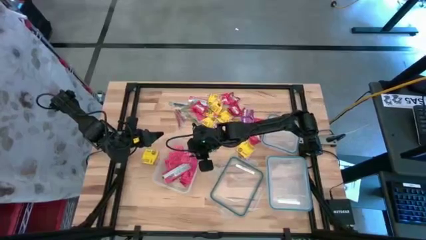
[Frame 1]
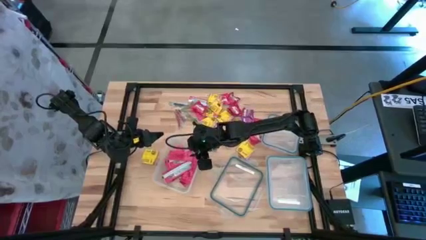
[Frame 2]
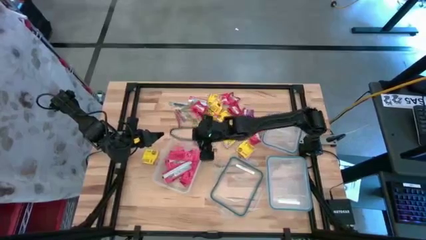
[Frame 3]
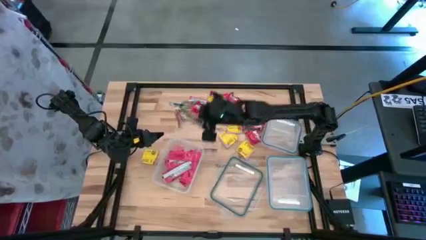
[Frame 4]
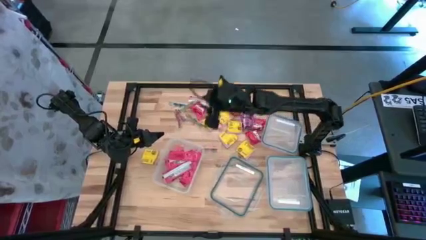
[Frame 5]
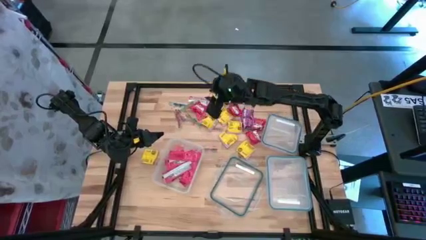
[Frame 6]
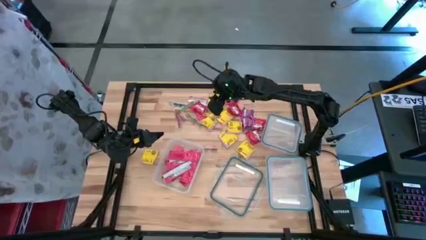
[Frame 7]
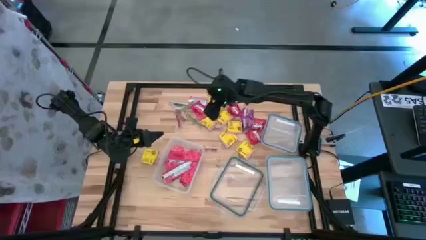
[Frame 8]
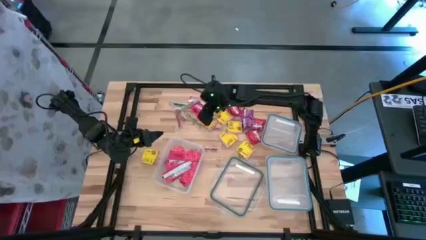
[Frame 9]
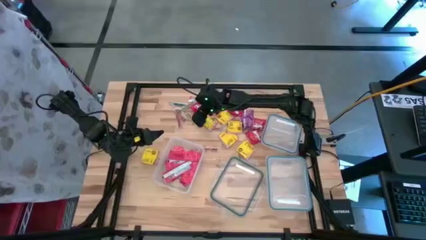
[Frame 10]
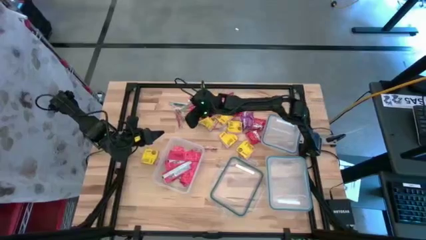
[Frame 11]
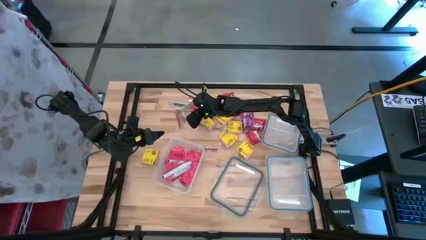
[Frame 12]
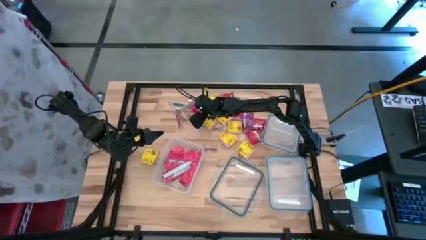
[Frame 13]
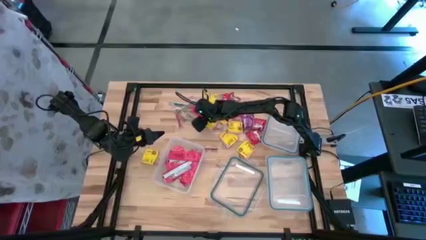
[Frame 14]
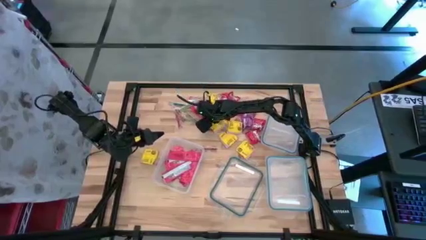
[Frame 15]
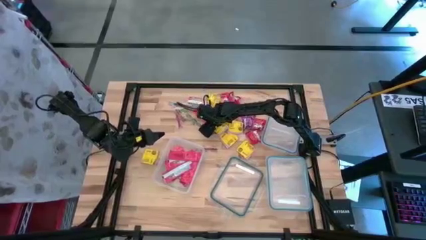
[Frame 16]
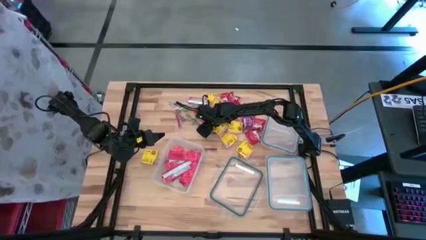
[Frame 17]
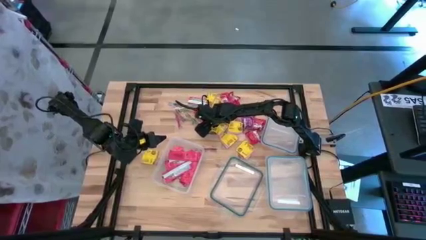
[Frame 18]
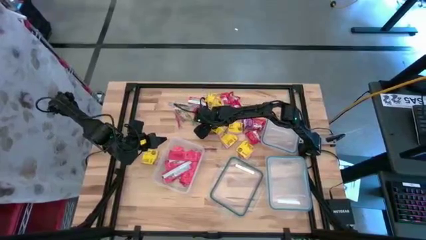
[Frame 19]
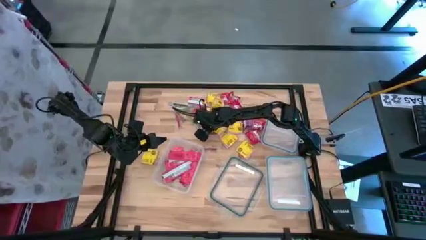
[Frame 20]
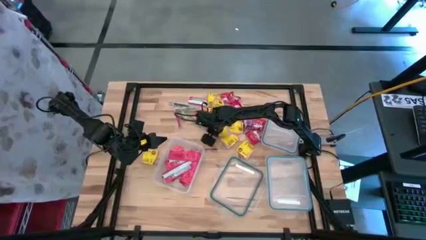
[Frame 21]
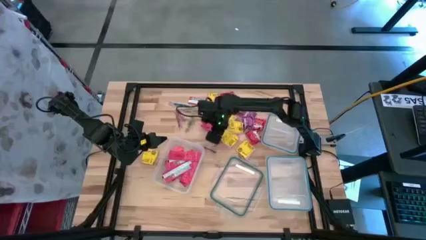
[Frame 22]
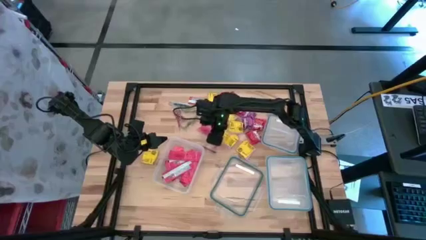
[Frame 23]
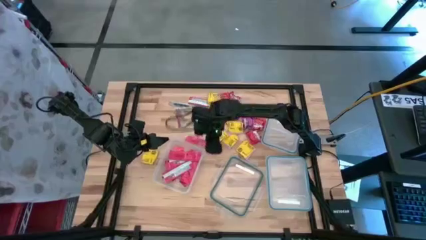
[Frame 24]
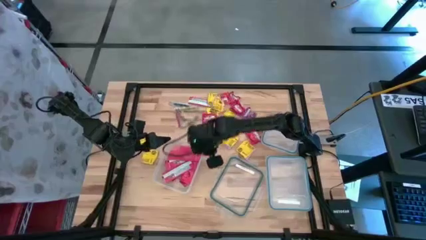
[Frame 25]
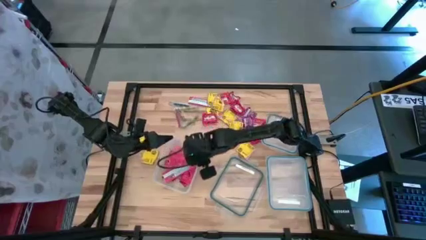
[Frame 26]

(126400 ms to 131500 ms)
Task: Sort candy
Put the red candy strip into the rectangular transparent bin

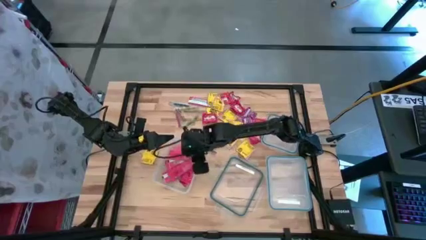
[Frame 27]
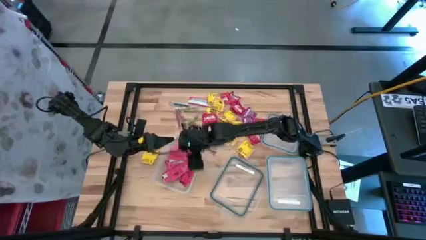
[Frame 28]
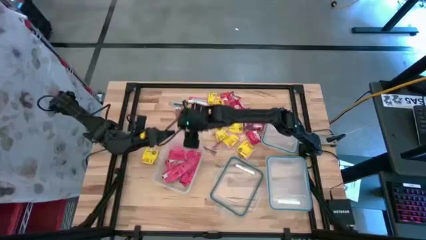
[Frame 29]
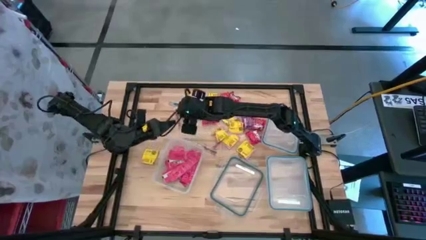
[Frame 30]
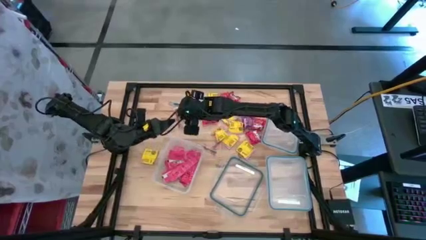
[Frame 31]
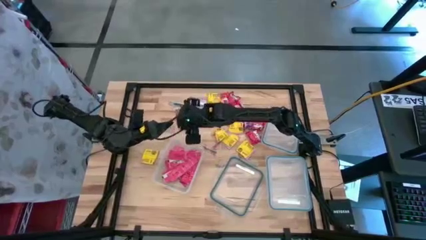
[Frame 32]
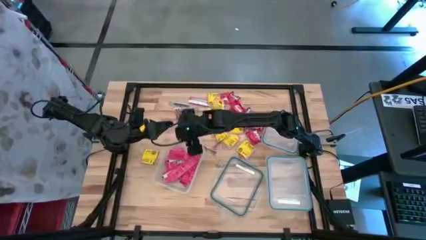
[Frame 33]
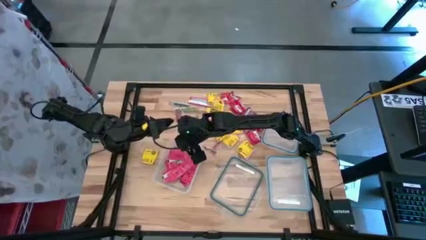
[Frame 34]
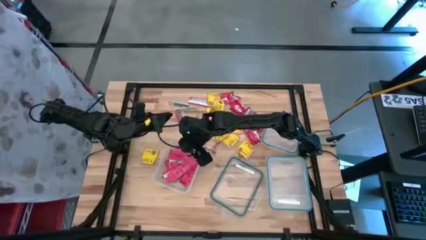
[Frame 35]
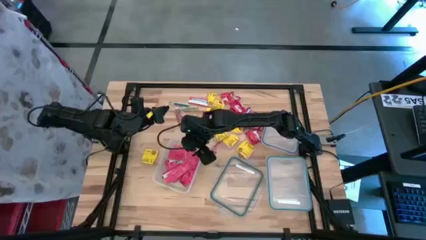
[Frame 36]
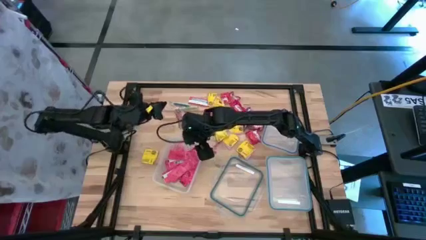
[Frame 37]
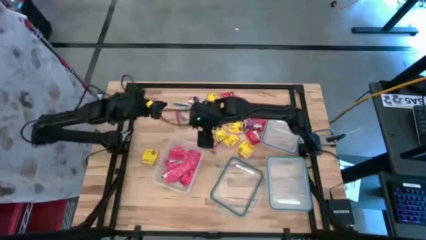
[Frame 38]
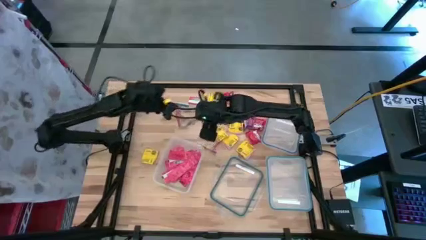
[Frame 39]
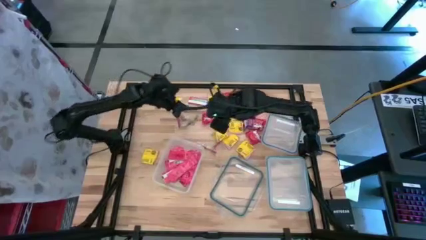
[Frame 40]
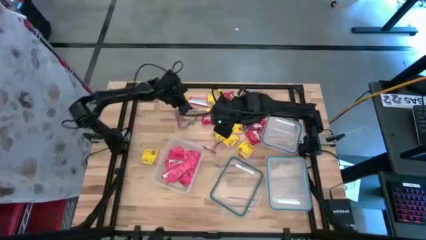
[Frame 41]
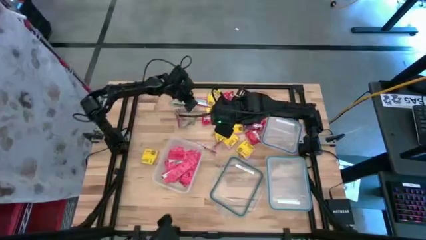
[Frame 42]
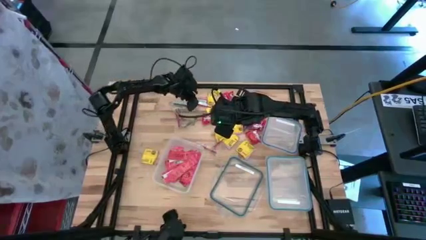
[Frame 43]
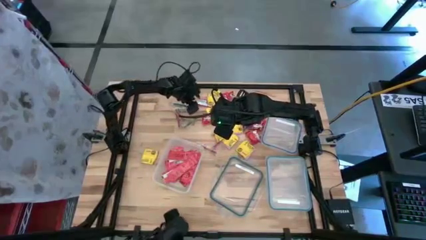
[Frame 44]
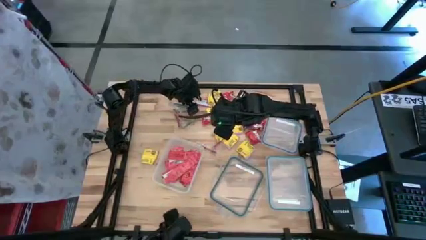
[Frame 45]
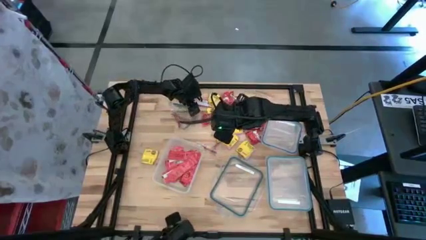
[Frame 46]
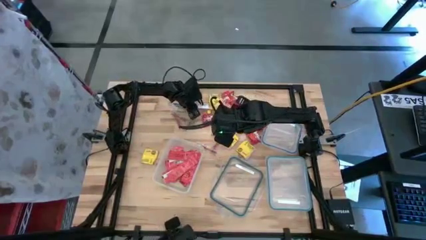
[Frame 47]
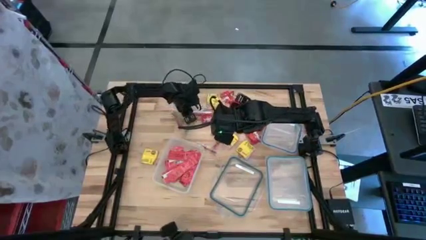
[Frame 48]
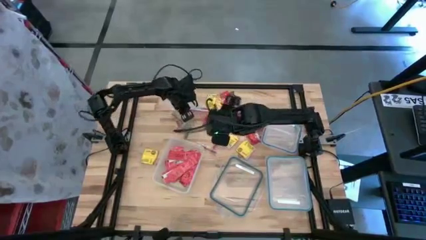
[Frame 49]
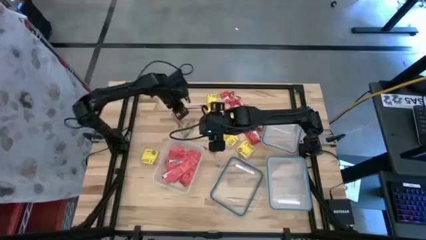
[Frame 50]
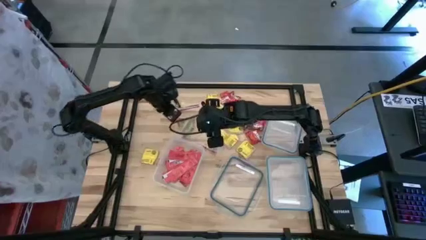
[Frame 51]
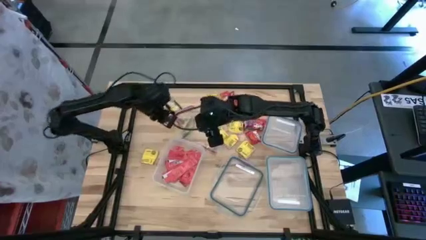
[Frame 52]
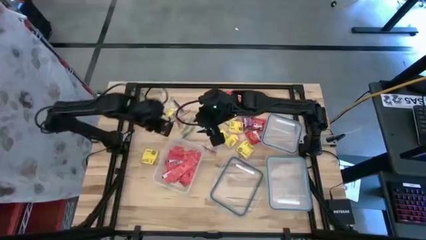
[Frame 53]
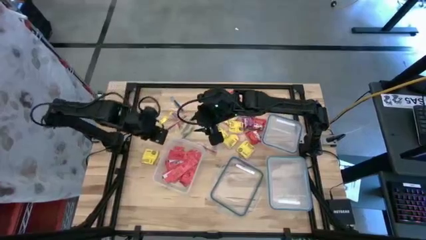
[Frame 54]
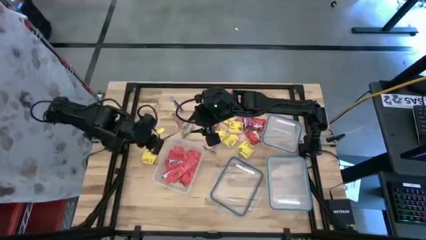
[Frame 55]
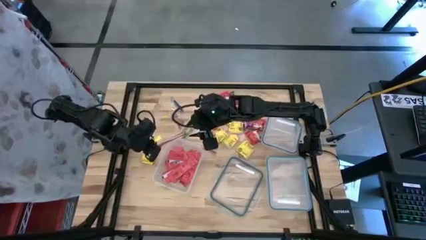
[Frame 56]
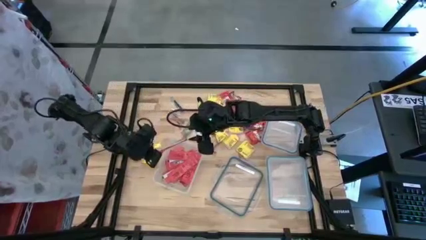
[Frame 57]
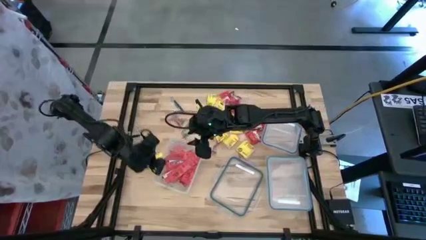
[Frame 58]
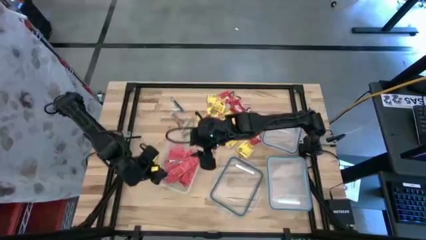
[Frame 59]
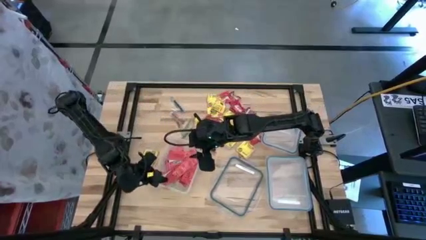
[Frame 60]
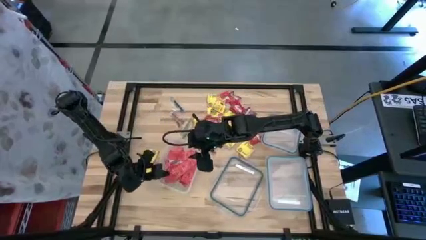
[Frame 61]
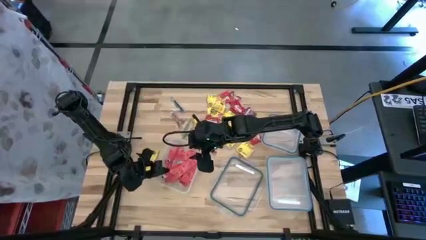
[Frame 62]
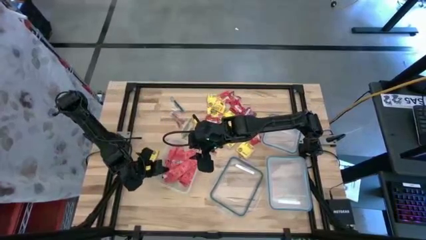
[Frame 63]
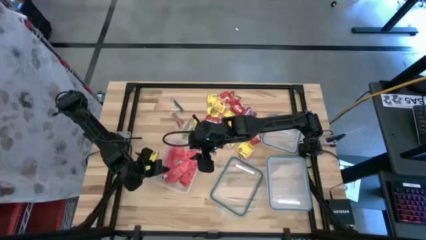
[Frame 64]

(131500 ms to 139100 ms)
Put the red candy strip into the rectangular transparent bin

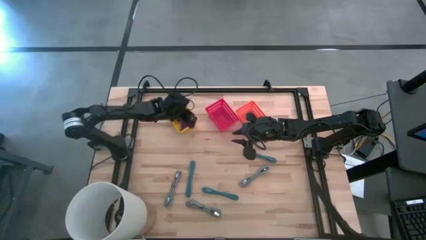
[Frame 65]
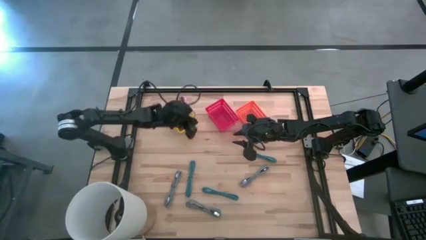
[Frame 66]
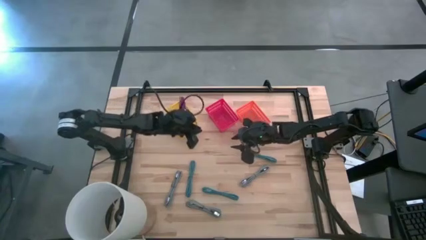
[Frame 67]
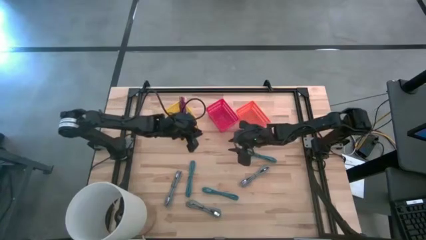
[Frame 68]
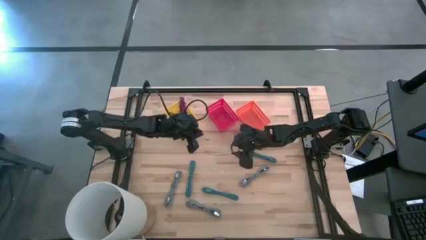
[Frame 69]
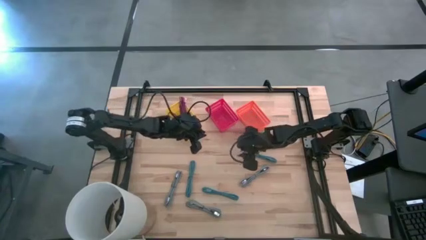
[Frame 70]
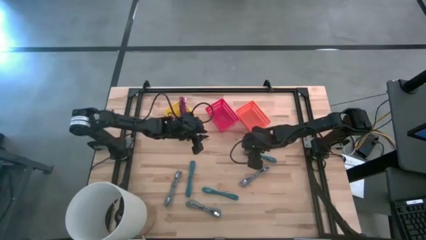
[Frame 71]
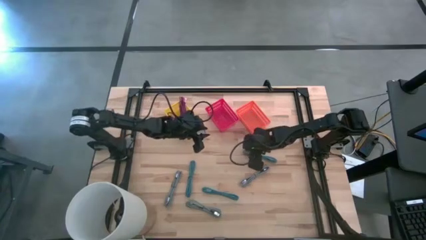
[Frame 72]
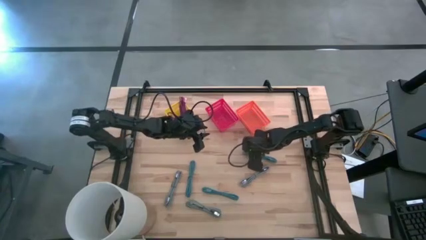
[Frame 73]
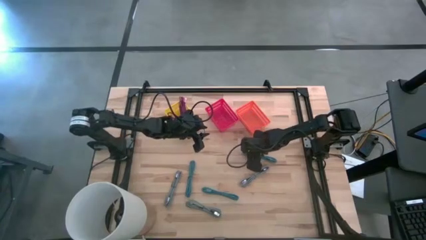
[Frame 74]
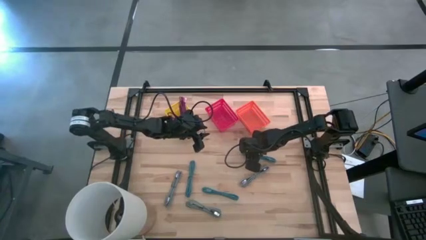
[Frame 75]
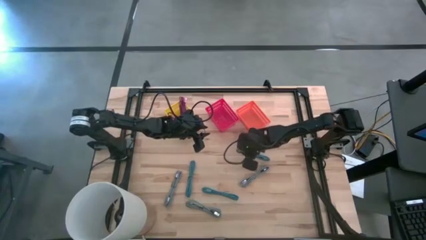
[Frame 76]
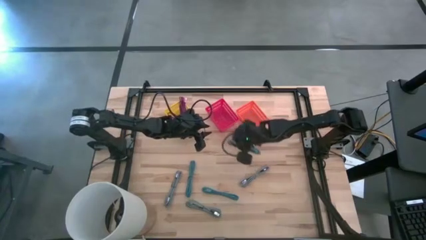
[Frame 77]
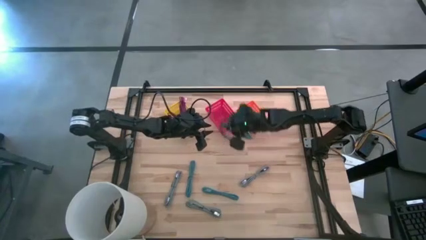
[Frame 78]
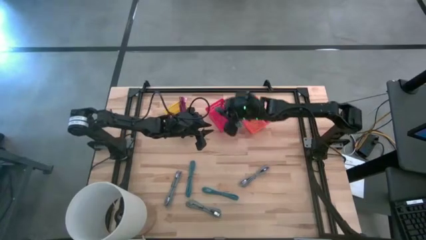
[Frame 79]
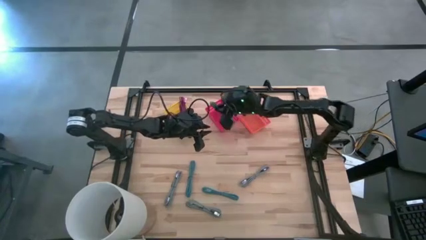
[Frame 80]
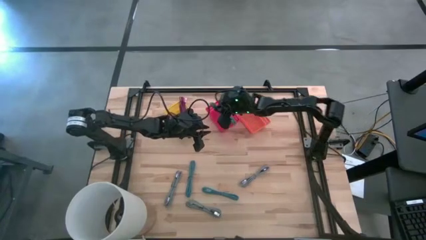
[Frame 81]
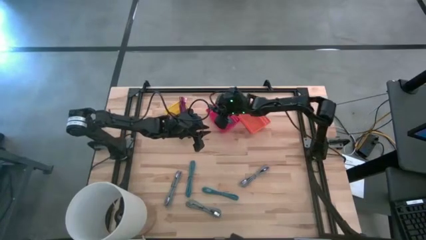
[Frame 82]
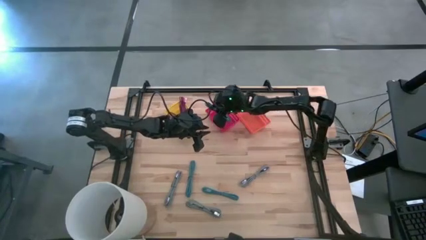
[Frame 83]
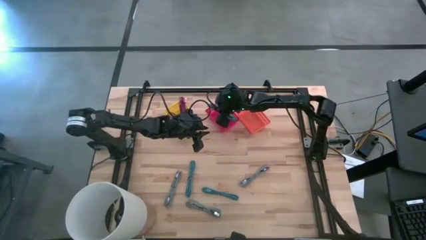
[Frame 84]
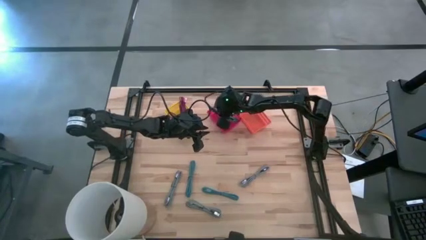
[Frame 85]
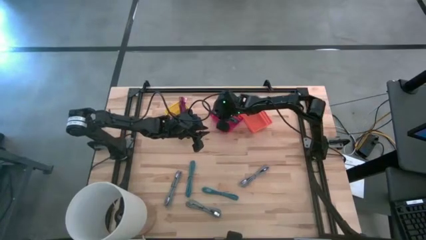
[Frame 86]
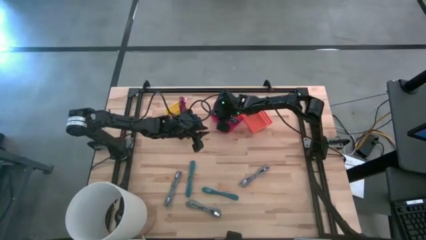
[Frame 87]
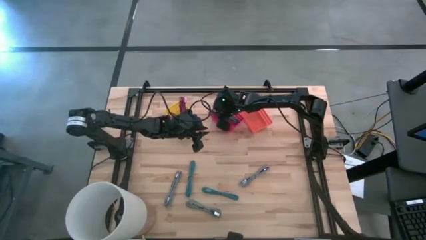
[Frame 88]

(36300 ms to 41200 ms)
Task: Pick & Place USB Port
Put the top black blue USB cable into the red bin
